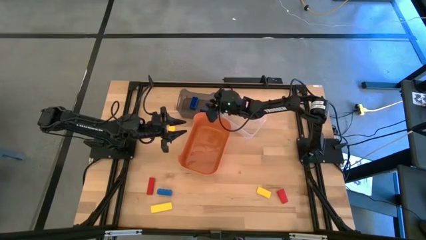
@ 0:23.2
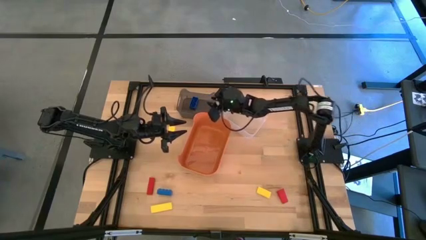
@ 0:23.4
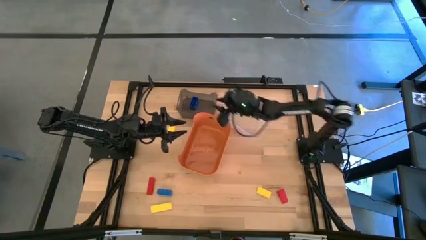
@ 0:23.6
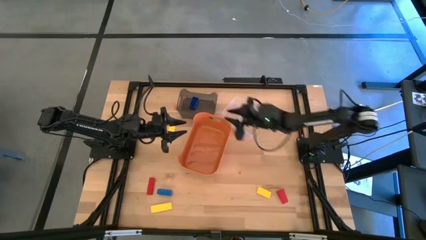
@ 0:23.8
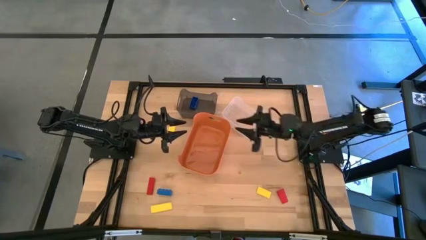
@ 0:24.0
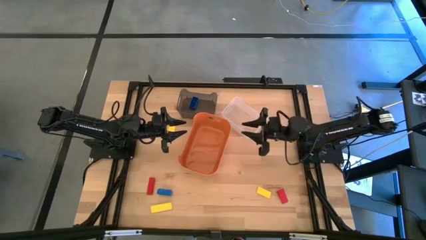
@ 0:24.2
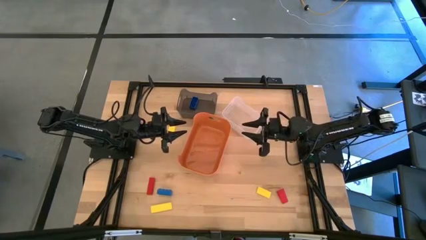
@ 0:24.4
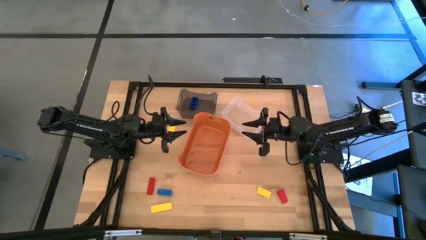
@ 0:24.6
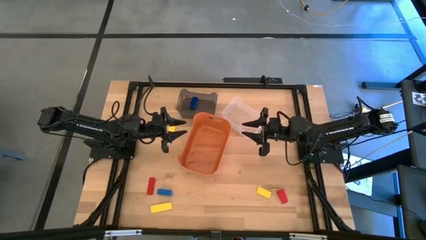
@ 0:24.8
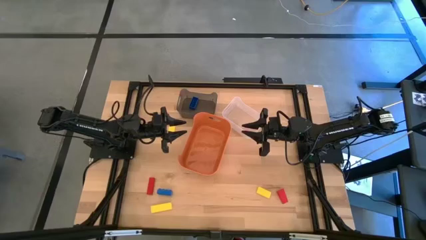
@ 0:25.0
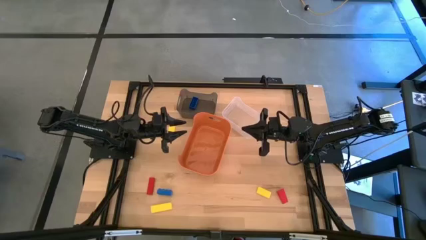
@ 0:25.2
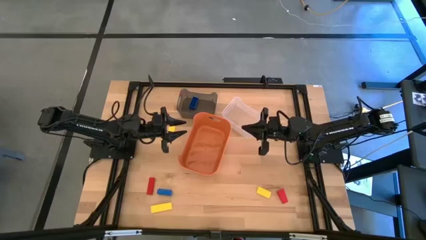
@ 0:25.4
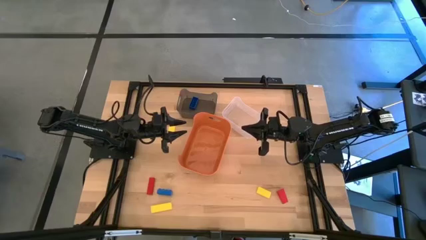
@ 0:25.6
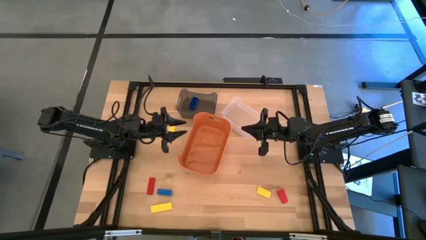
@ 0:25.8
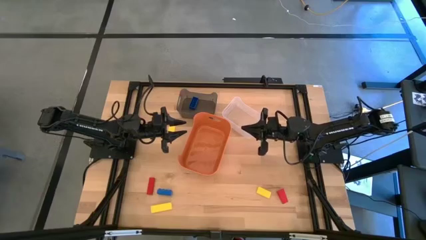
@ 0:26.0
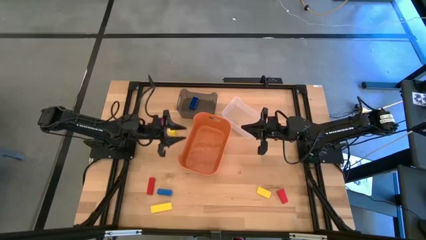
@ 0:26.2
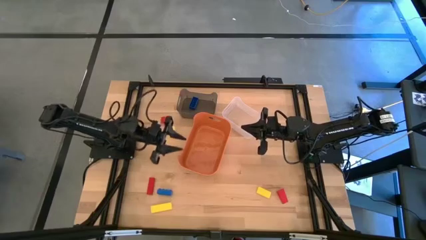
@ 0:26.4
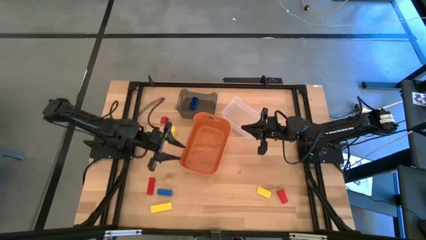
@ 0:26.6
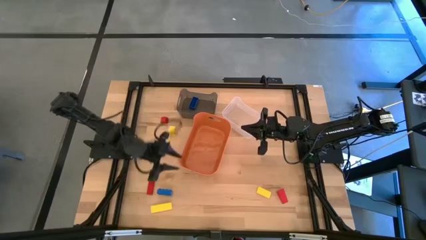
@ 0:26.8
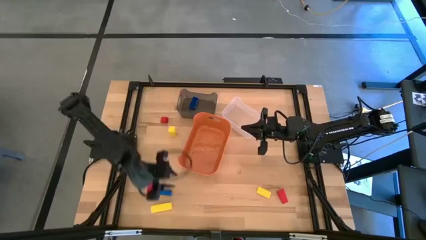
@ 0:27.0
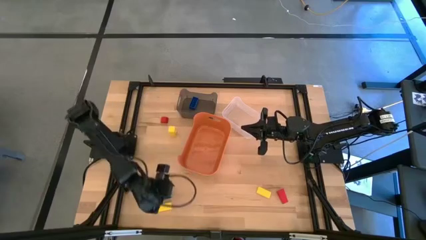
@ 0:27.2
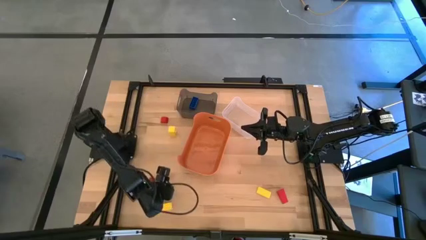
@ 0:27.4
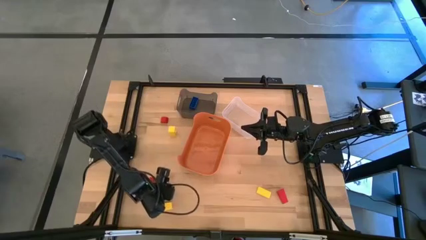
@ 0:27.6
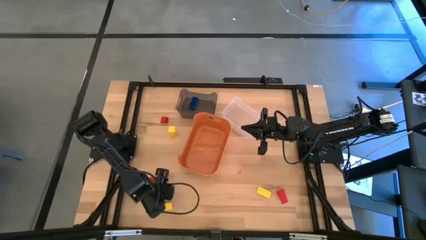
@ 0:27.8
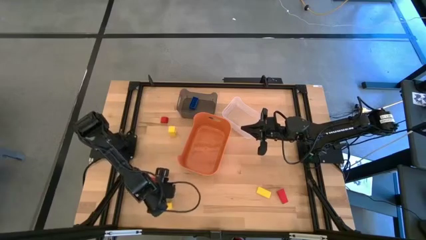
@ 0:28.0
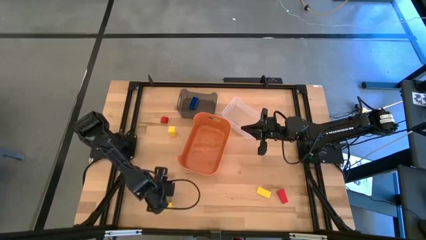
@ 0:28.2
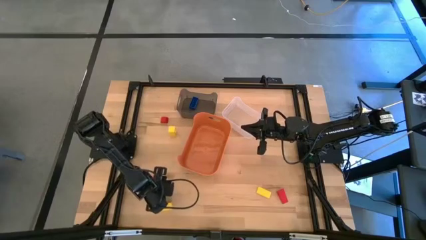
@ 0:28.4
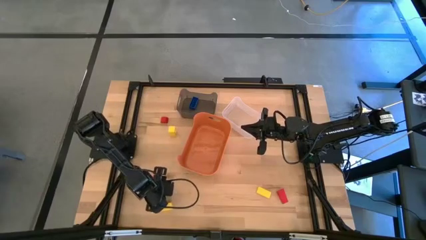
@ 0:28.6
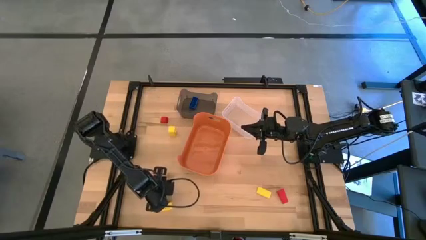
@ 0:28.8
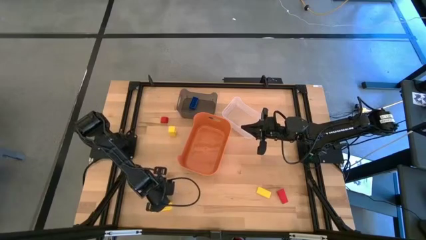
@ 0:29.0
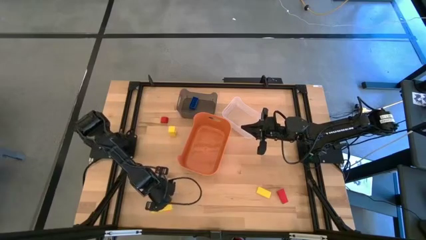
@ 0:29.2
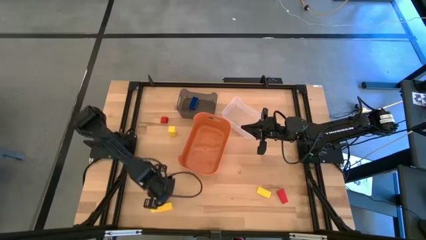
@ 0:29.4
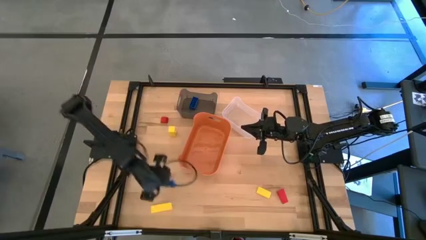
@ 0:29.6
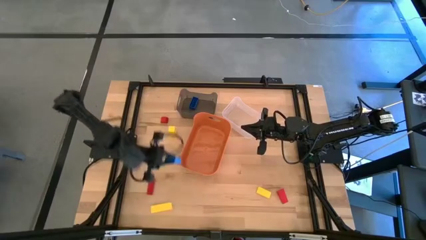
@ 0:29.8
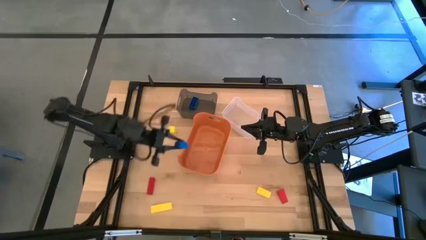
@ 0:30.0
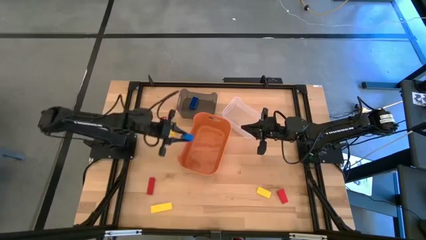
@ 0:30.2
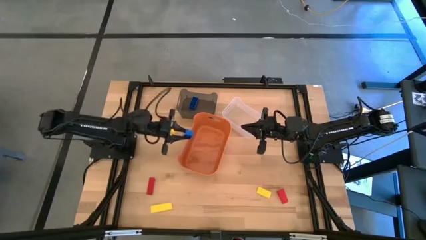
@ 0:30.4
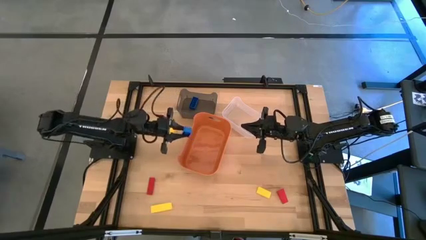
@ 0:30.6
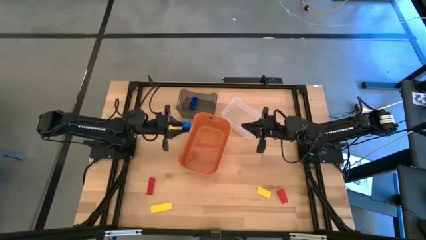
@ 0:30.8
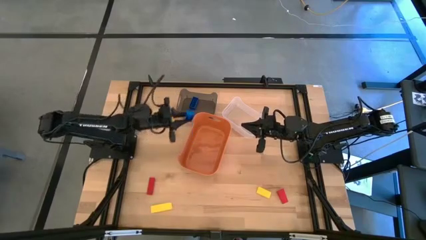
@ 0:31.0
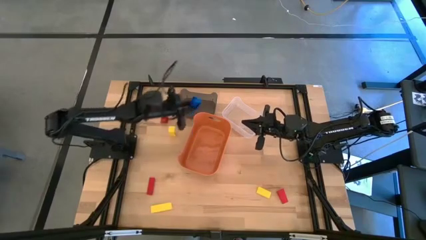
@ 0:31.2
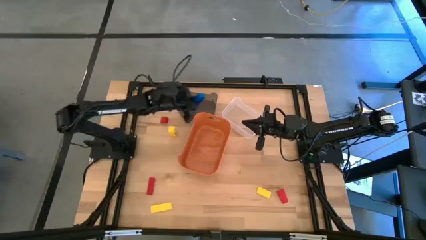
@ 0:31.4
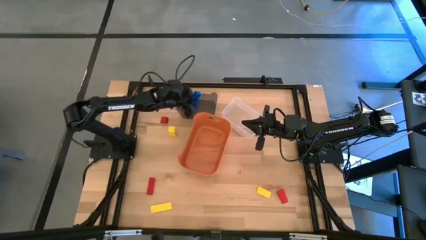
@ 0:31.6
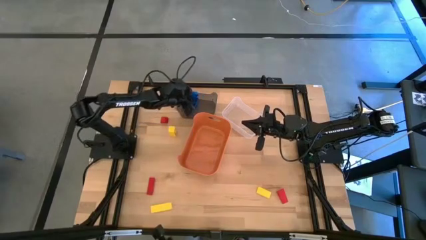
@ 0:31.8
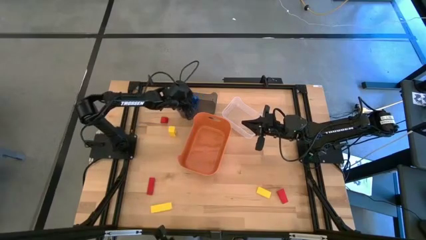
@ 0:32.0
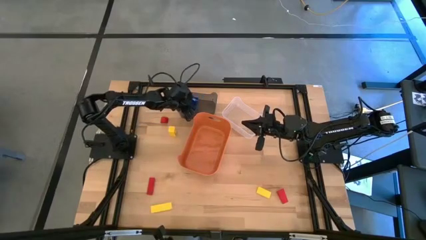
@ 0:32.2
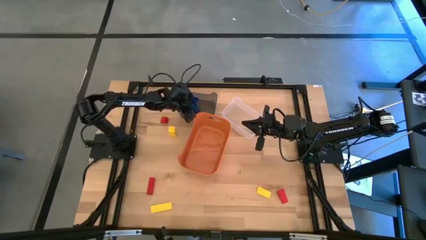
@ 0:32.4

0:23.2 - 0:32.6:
Task: Sort & place blocks by color
Put the blue game piece into the black bin

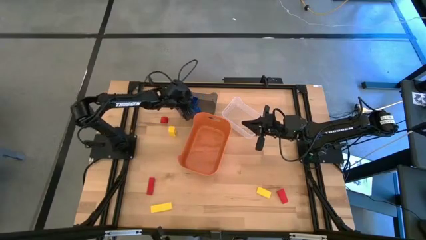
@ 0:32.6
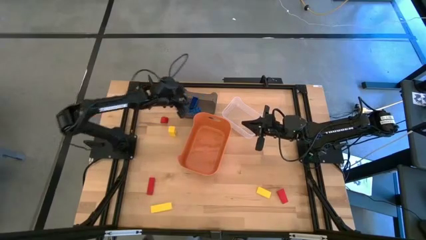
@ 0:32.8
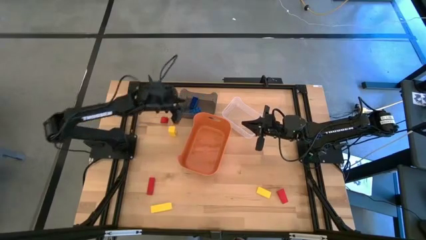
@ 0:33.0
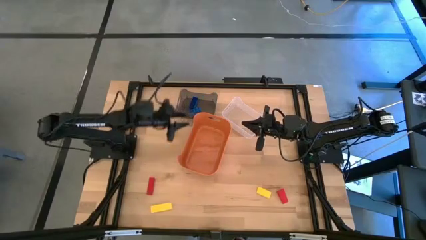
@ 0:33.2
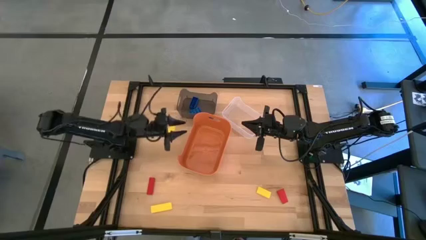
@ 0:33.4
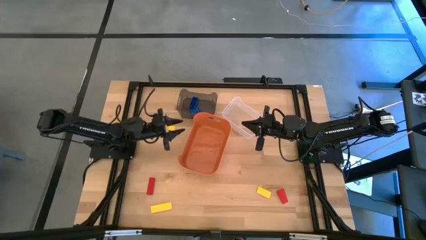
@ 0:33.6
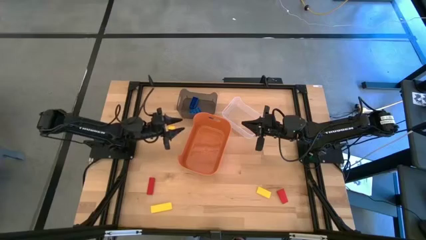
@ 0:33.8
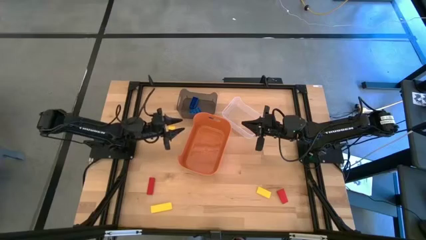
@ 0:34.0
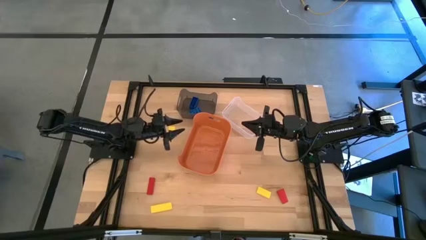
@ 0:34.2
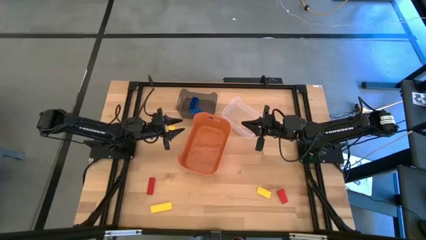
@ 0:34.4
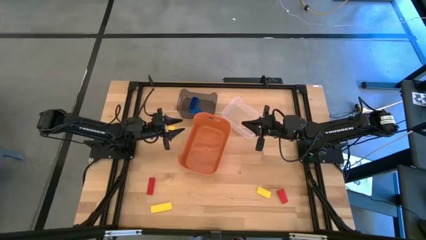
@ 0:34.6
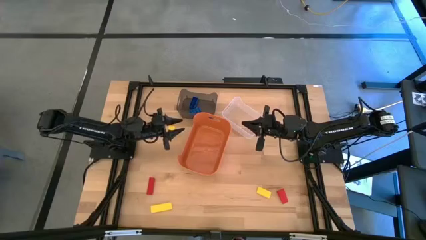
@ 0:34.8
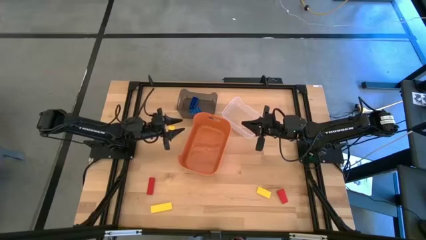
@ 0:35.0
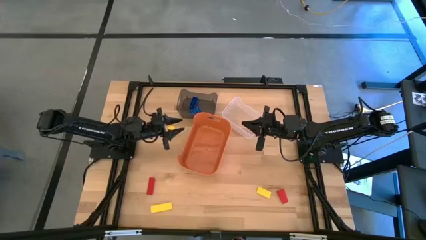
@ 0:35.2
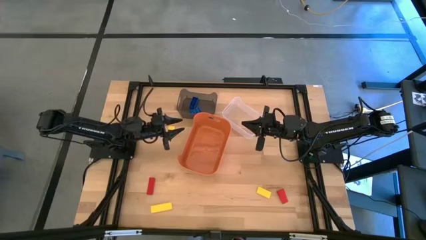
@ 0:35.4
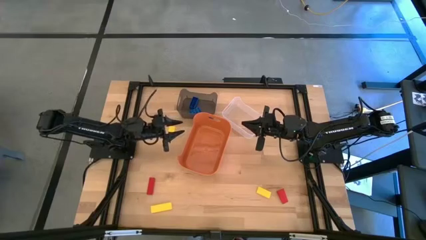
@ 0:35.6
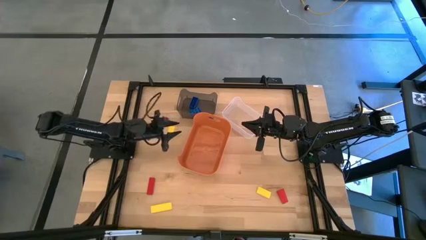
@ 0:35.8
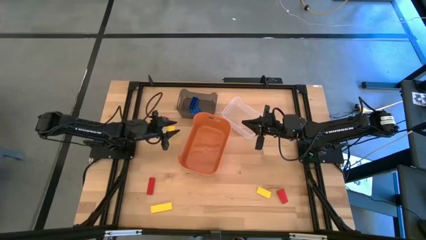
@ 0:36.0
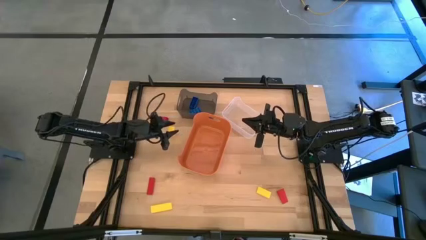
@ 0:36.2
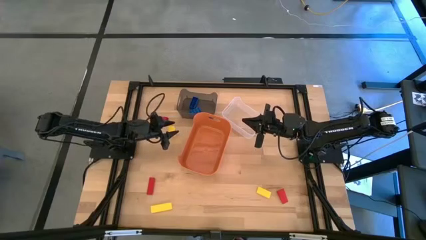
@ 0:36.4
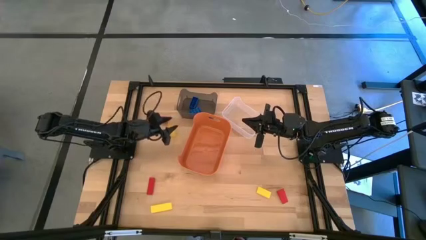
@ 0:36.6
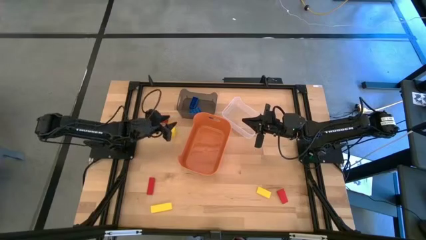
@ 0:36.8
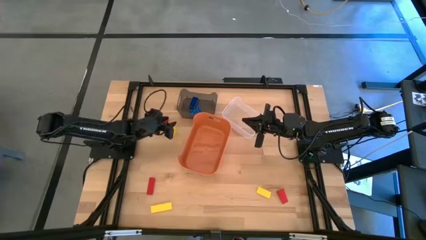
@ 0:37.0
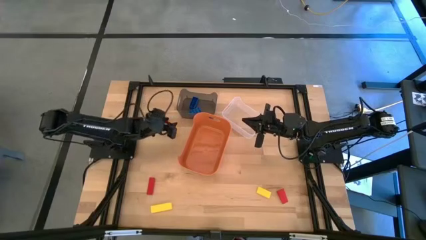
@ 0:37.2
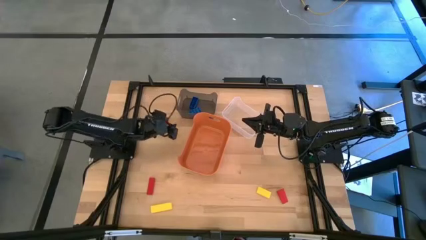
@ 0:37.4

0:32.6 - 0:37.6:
Put the top yellow block into the orange bin

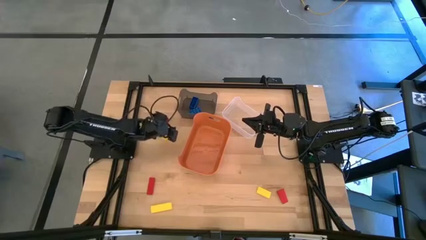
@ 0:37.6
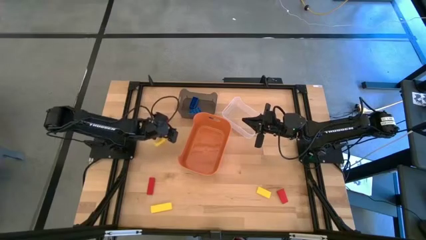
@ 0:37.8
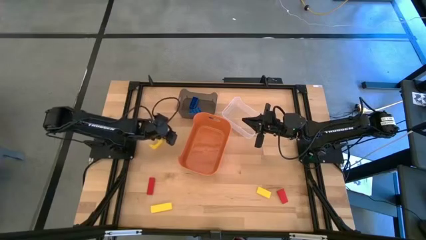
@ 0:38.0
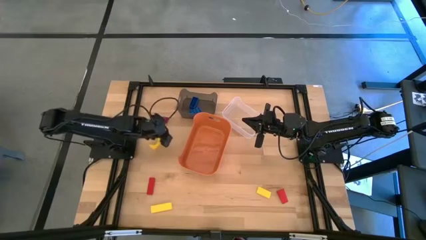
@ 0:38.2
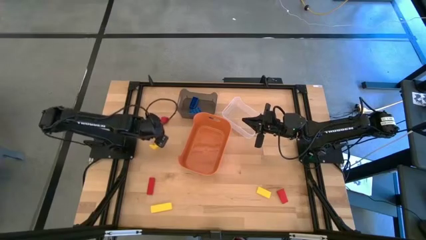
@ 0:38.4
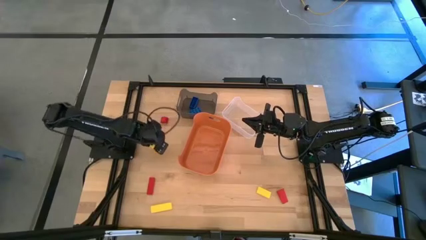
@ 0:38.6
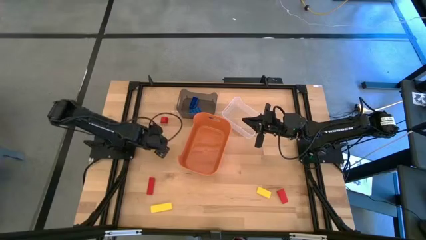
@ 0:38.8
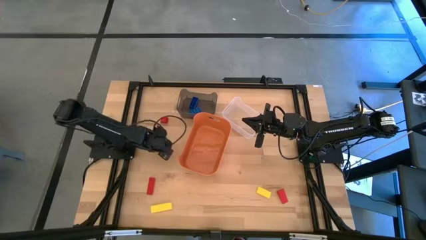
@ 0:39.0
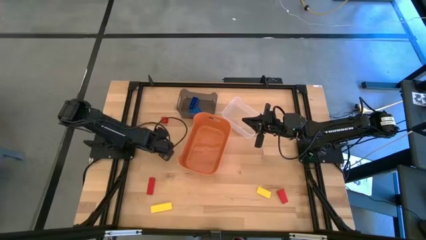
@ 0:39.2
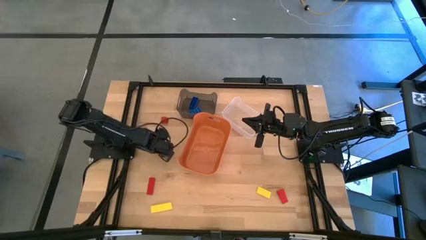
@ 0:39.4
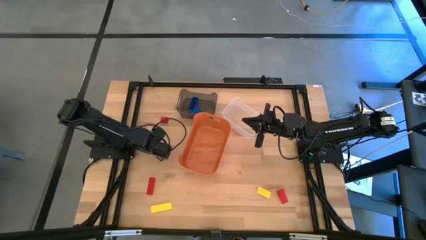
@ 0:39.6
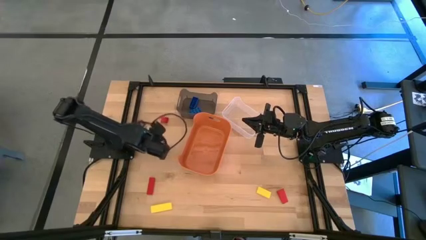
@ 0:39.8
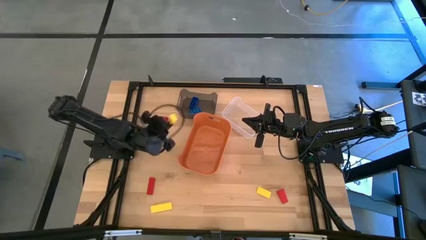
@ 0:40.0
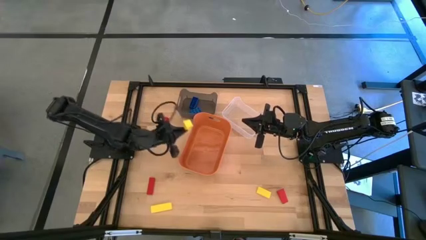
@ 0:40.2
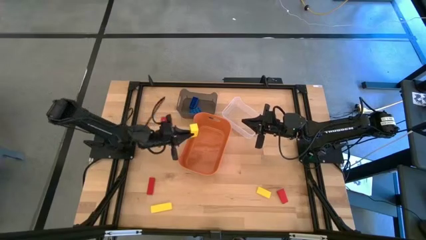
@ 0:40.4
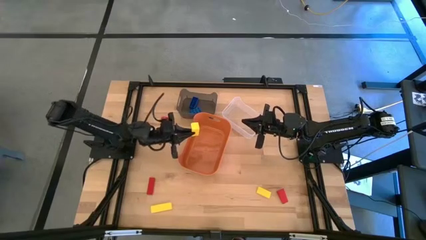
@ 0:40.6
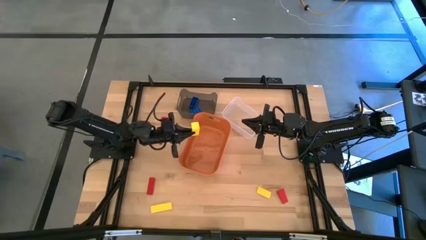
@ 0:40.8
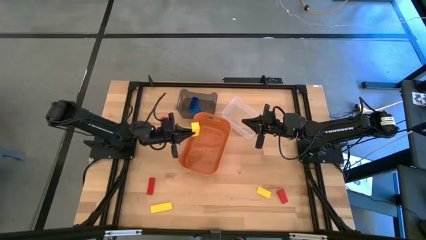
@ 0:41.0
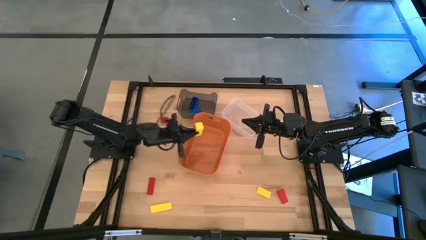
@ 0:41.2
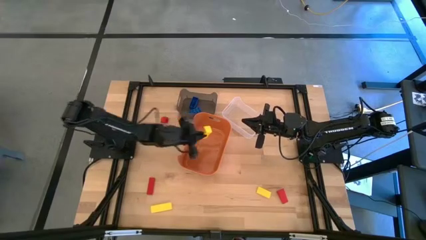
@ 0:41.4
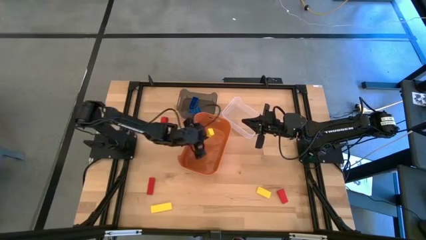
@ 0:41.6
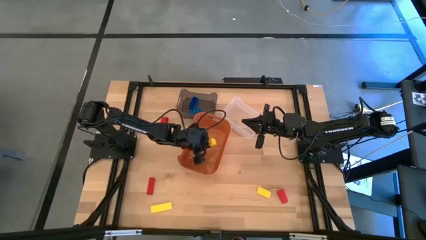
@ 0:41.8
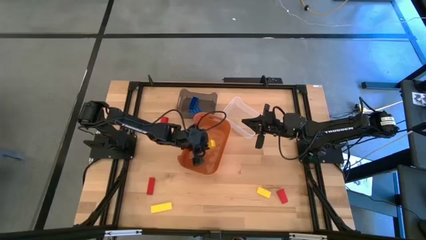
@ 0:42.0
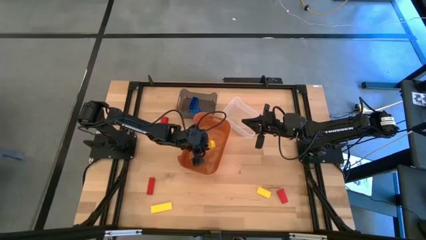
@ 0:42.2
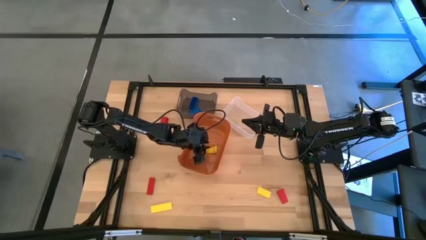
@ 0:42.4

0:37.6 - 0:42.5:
Put the top yellow block into the orange bin
